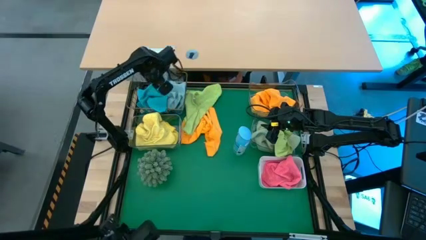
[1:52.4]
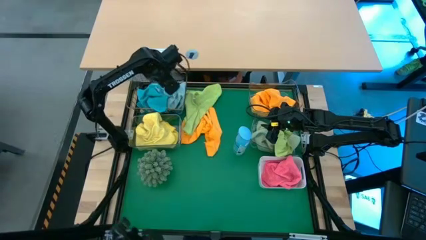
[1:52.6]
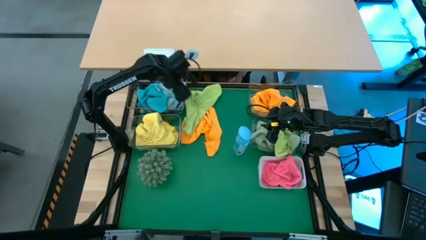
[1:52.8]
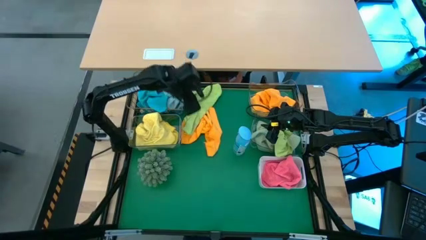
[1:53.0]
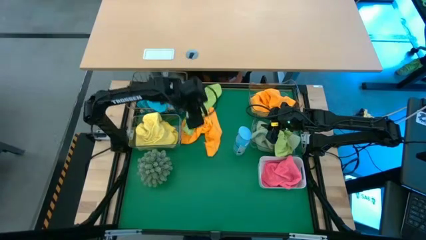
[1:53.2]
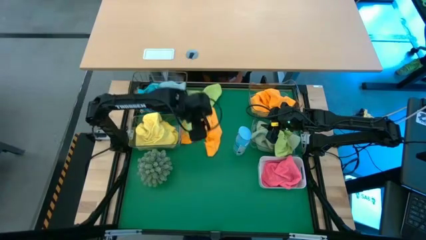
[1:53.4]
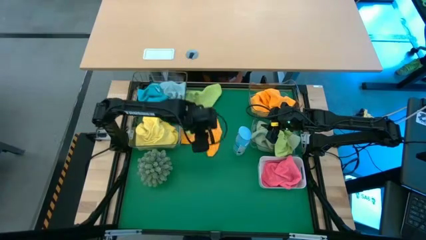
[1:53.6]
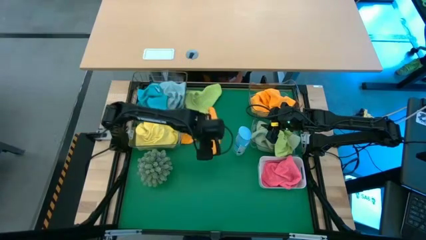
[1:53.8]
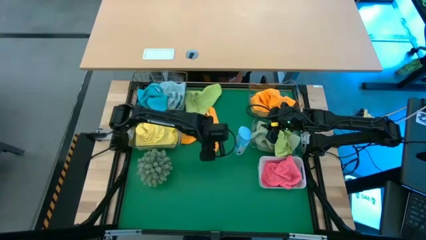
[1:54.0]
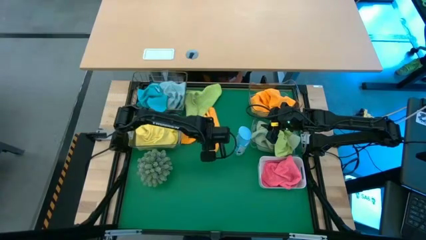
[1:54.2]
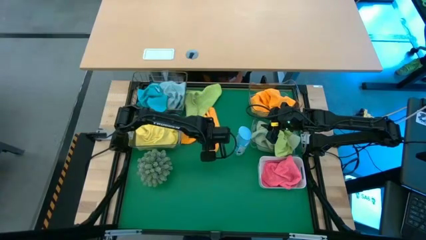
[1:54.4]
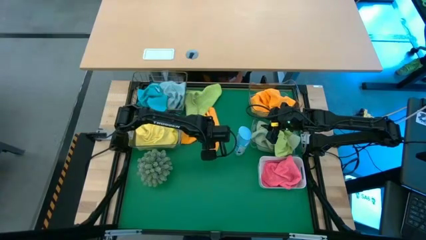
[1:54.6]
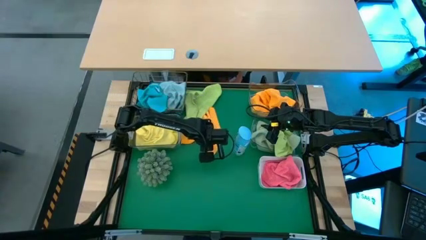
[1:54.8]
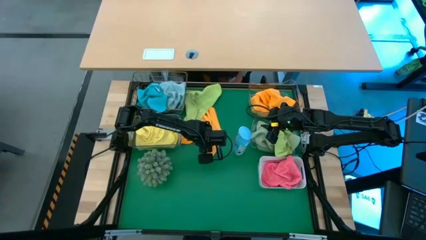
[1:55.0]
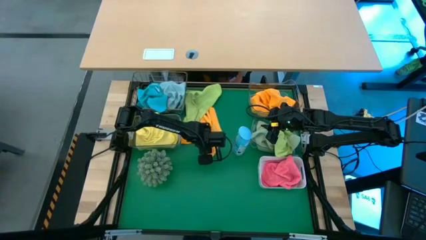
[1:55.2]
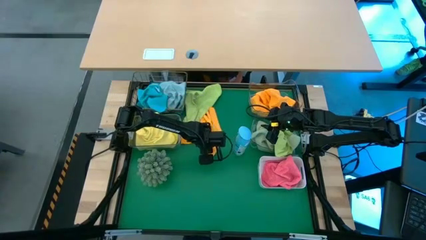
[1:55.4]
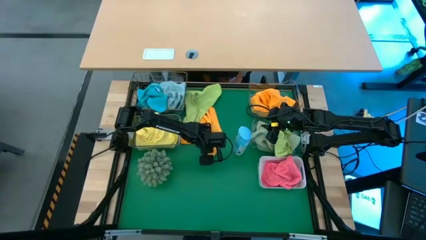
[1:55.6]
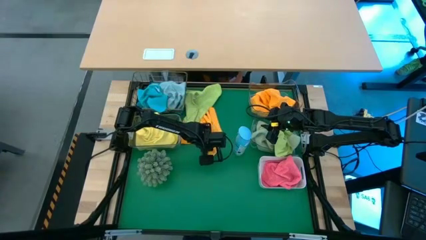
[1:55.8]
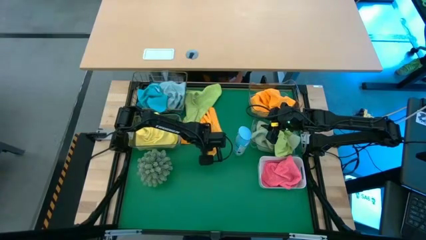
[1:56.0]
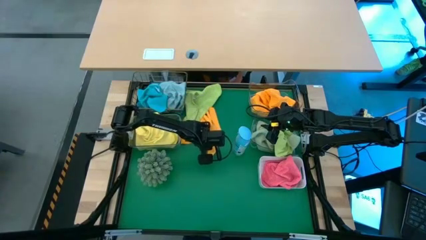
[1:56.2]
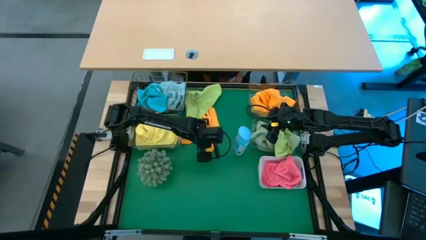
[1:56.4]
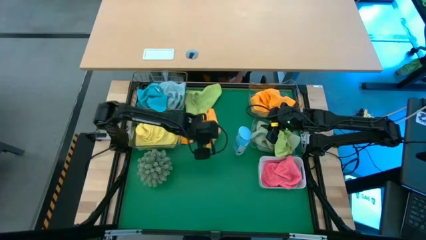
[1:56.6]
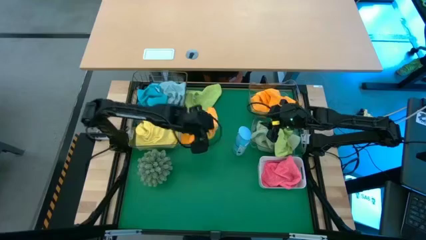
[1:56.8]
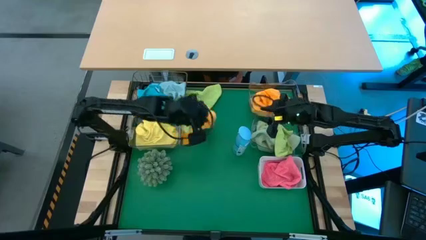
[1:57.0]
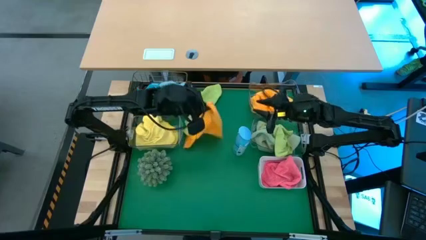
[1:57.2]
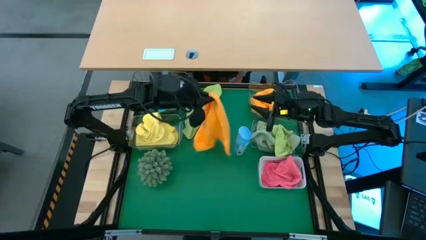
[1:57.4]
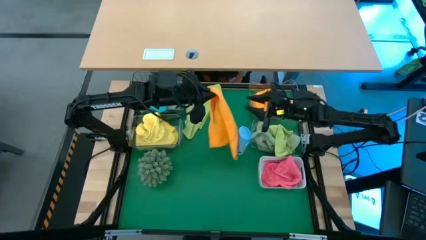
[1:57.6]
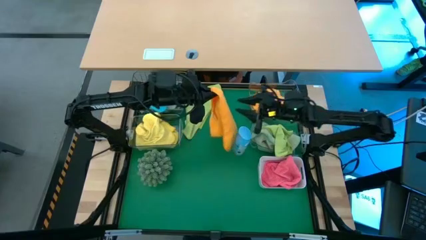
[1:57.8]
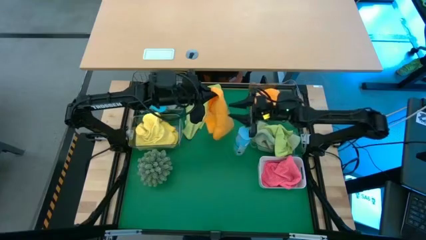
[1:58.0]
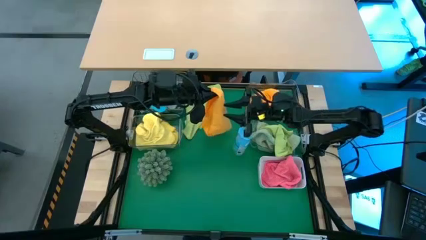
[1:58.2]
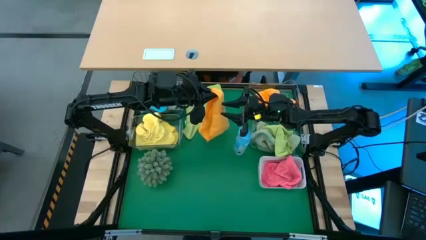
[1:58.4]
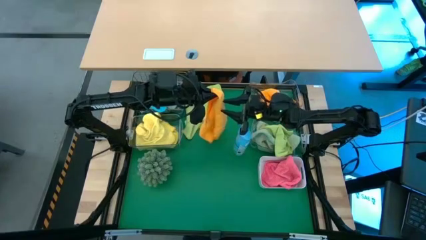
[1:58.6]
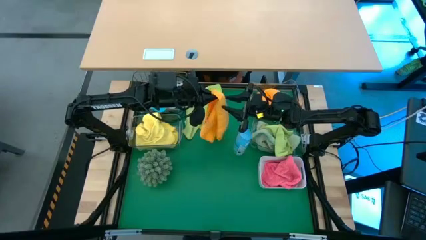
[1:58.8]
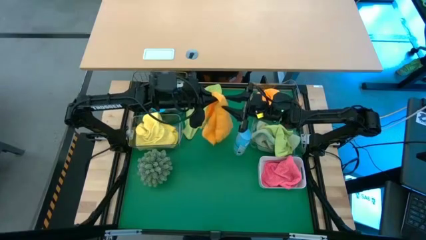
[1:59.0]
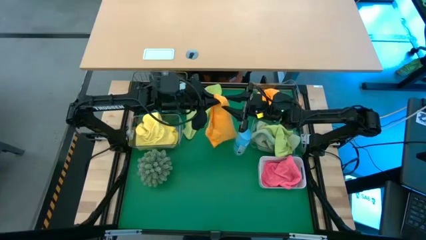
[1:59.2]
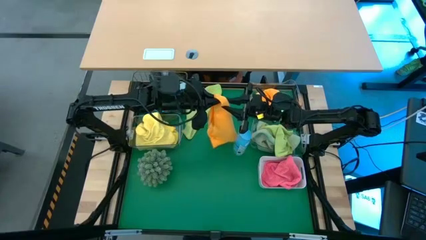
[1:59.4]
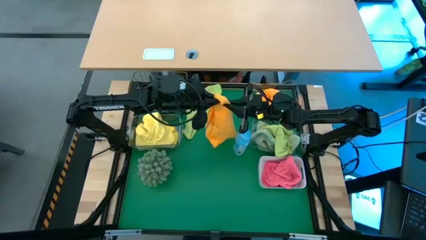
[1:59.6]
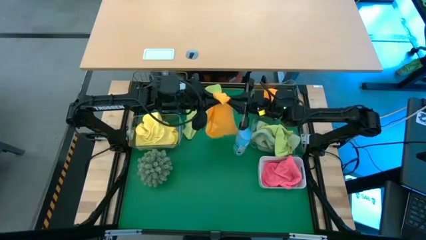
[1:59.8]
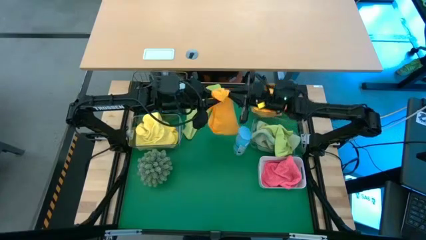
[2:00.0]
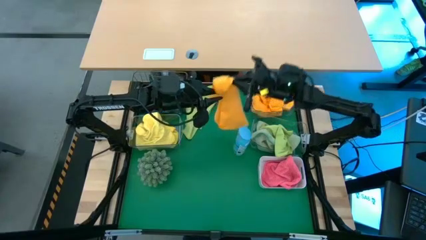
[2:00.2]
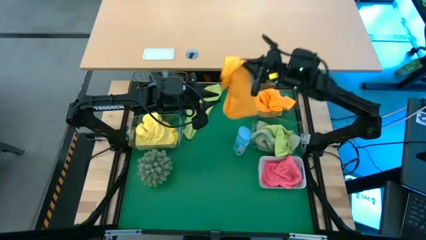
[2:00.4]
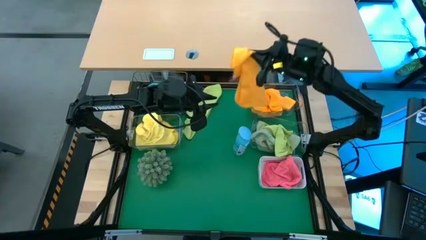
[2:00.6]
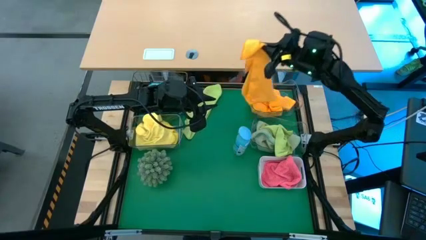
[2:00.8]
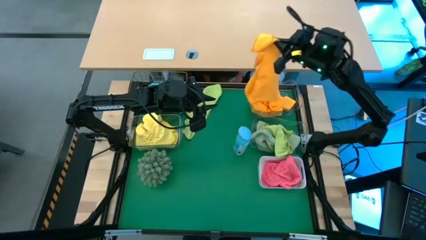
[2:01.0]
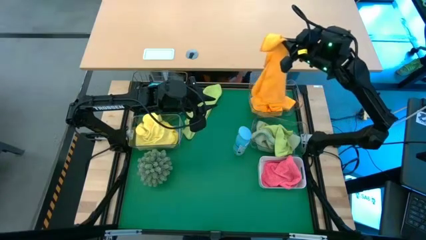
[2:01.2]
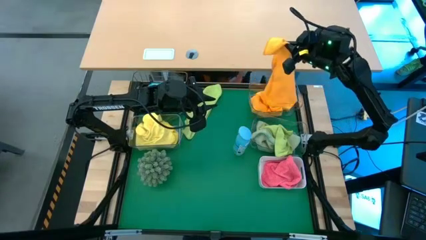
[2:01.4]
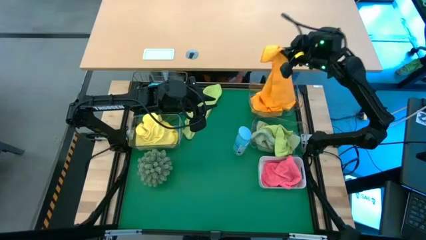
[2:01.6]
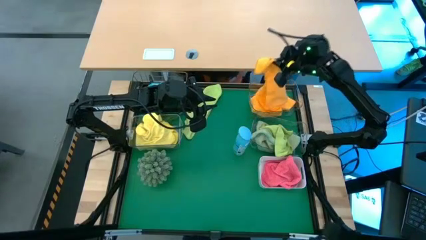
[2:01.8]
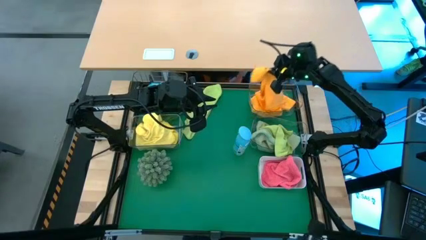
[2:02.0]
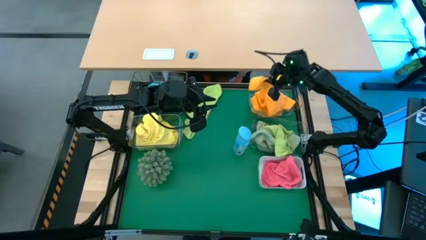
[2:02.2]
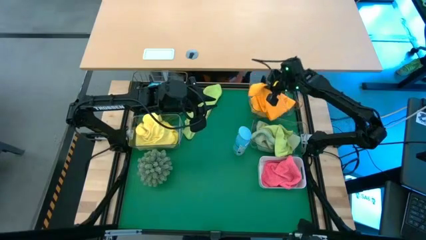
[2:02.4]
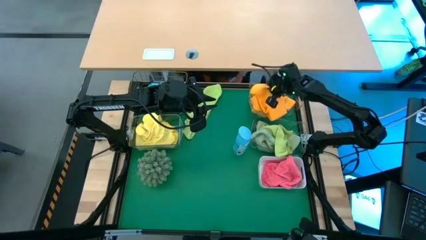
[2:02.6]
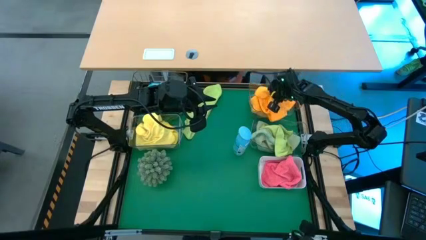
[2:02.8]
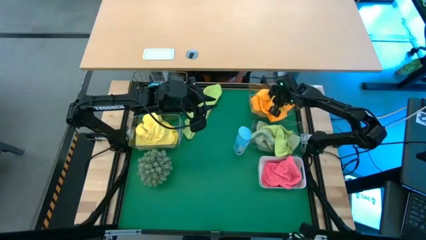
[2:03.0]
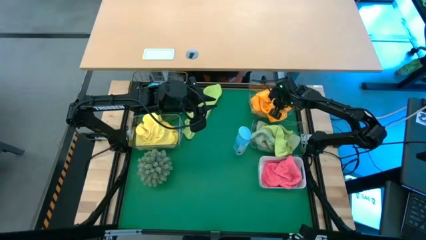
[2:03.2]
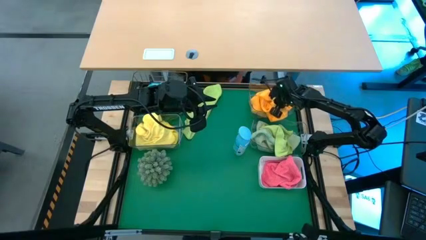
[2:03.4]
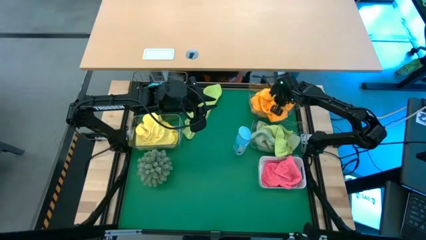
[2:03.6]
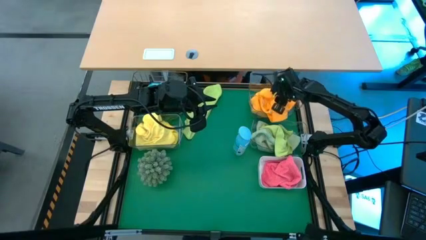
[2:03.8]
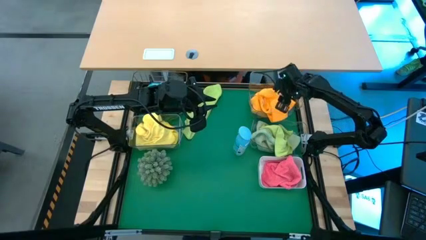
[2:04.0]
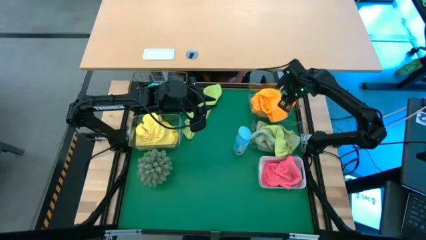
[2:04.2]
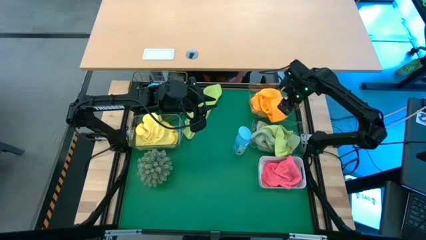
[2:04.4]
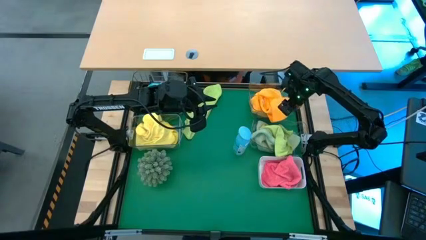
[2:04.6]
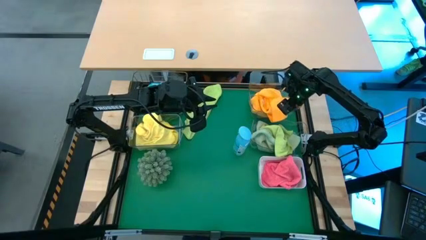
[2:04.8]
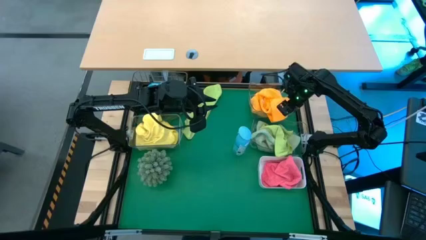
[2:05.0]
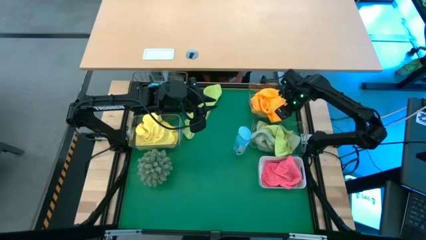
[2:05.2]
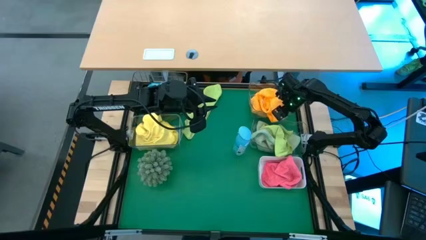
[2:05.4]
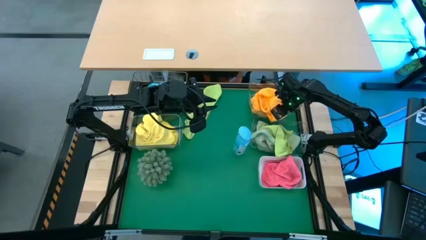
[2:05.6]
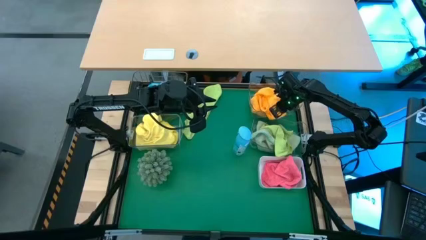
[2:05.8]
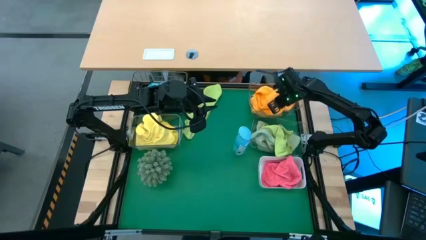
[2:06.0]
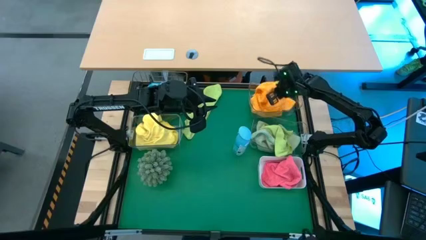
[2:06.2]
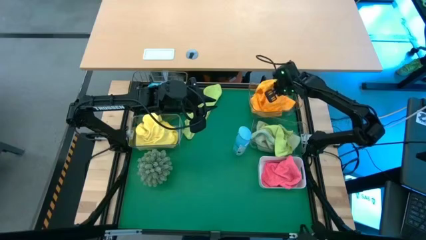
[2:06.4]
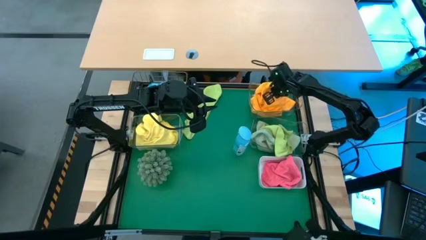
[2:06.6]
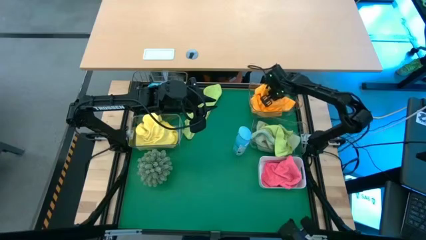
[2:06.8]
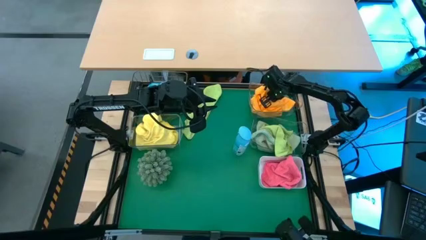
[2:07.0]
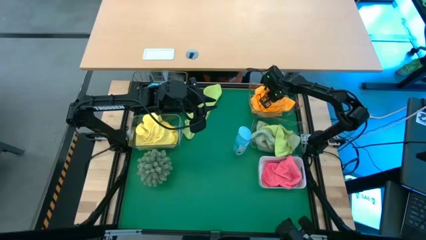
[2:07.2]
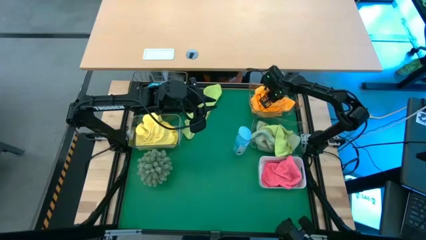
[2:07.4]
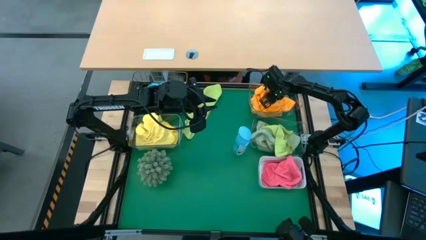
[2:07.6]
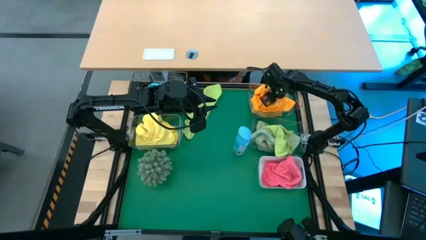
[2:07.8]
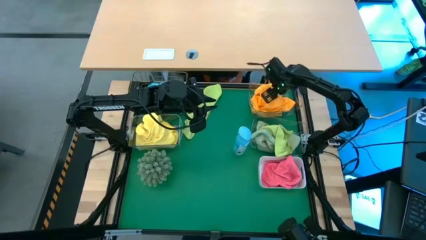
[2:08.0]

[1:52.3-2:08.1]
Task: Sort microfiber towel by color & place in baskets
Put the orange microfiber towel into the top right transparent bin
